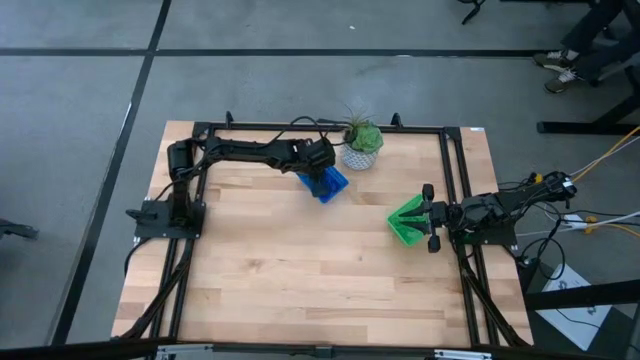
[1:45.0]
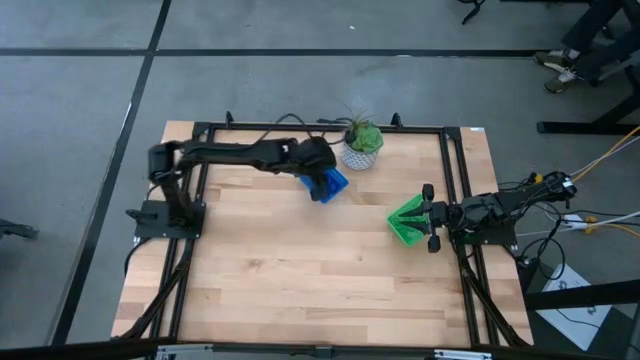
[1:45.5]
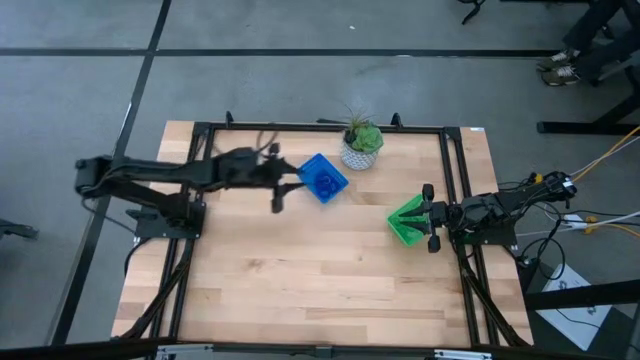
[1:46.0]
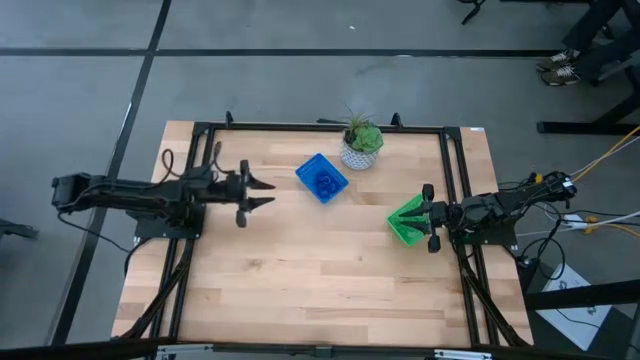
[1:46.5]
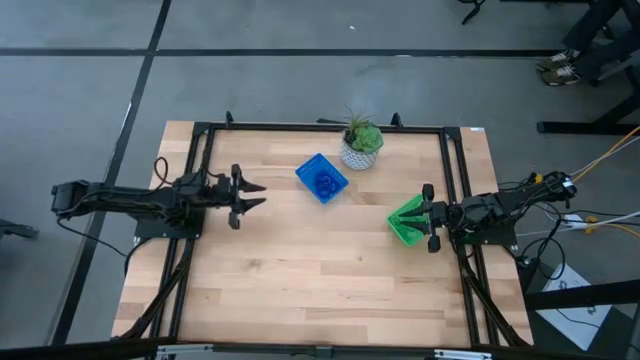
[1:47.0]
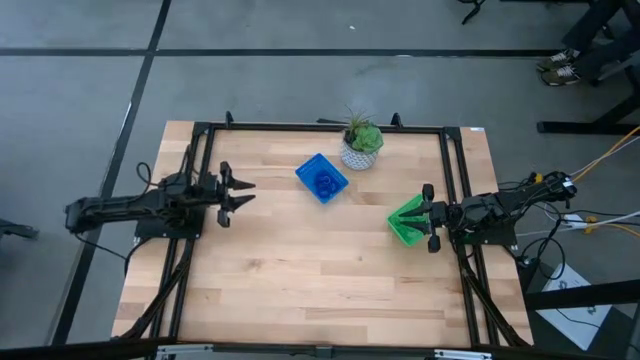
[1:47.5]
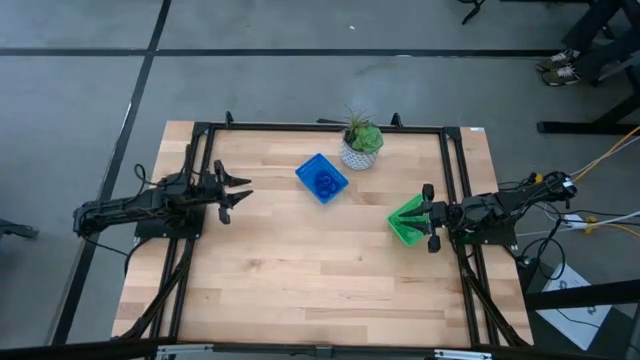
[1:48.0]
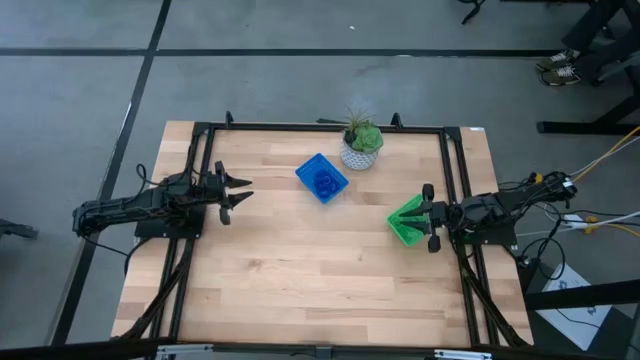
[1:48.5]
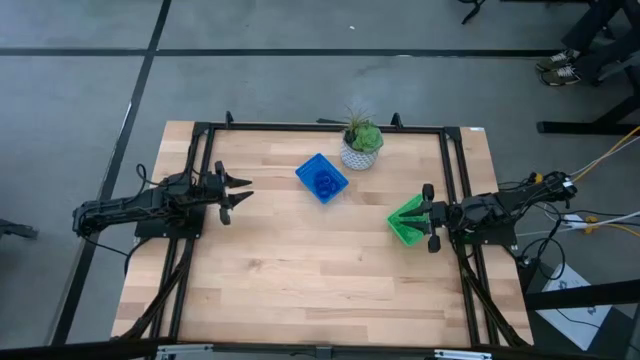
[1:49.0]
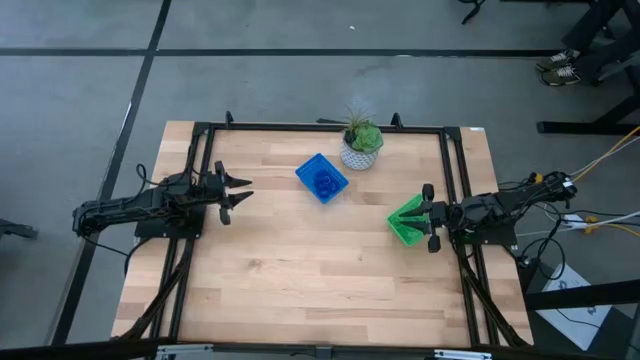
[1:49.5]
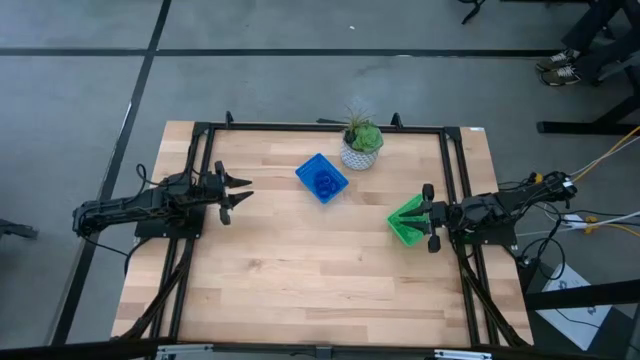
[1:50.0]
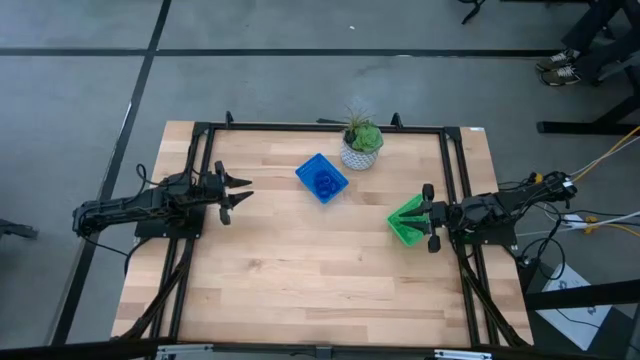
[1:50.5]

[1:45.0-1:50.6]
Task: Sort items
Return to Home Position

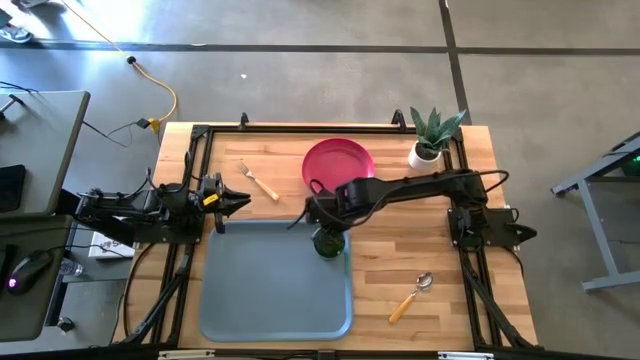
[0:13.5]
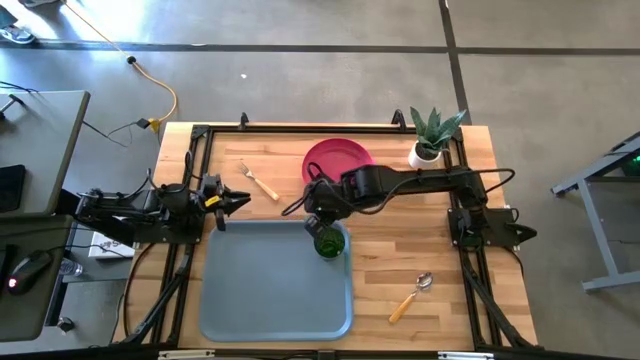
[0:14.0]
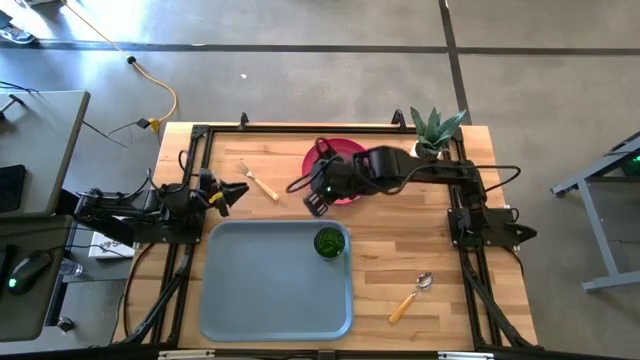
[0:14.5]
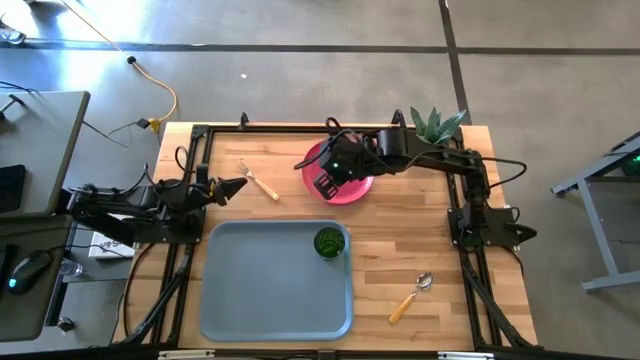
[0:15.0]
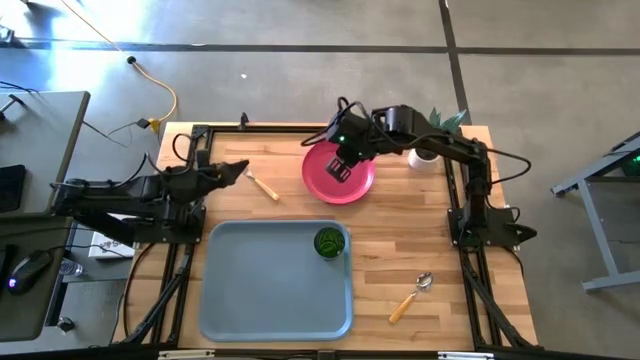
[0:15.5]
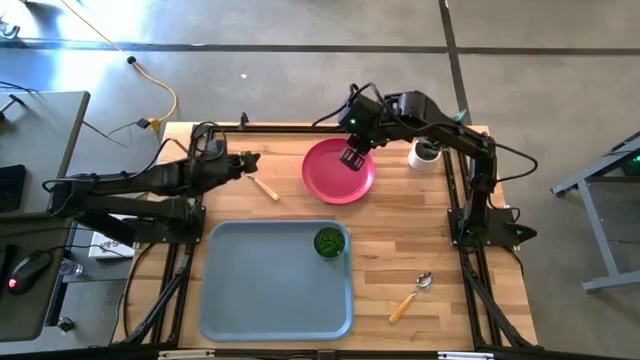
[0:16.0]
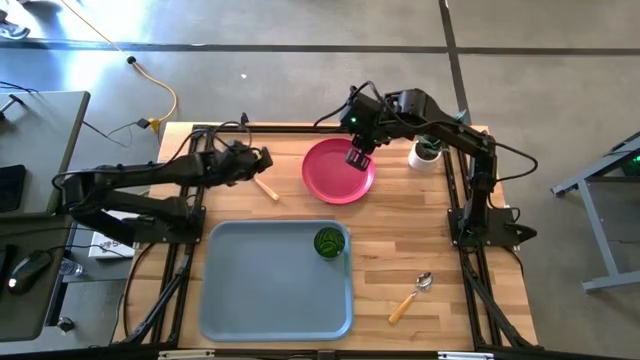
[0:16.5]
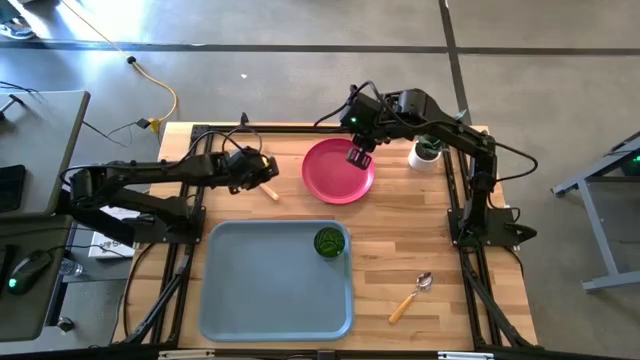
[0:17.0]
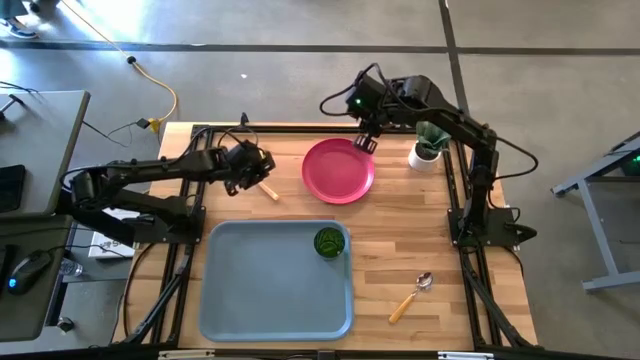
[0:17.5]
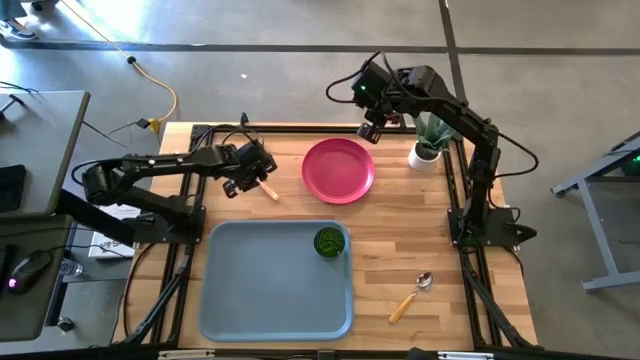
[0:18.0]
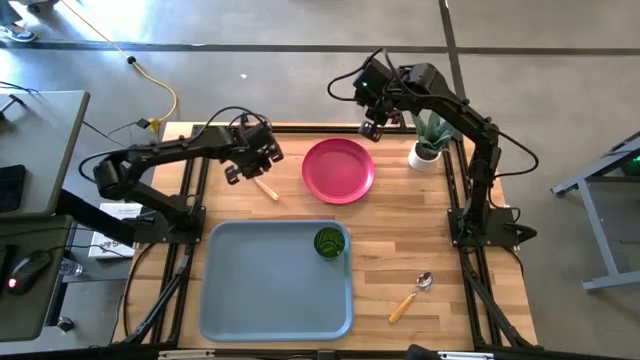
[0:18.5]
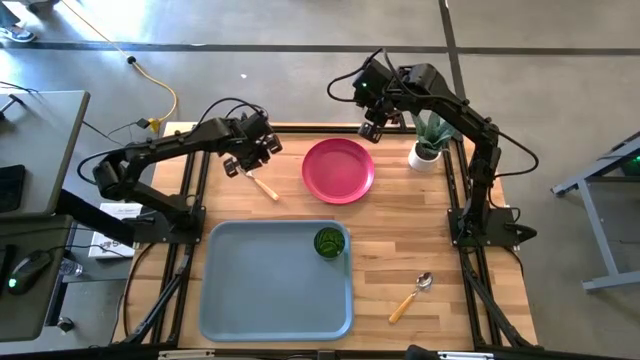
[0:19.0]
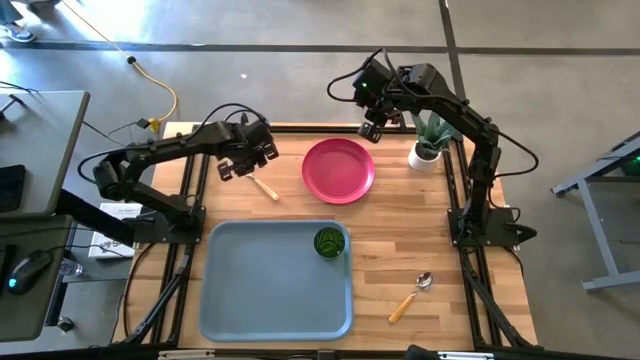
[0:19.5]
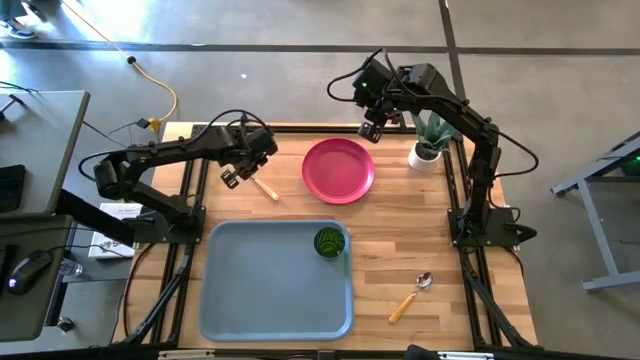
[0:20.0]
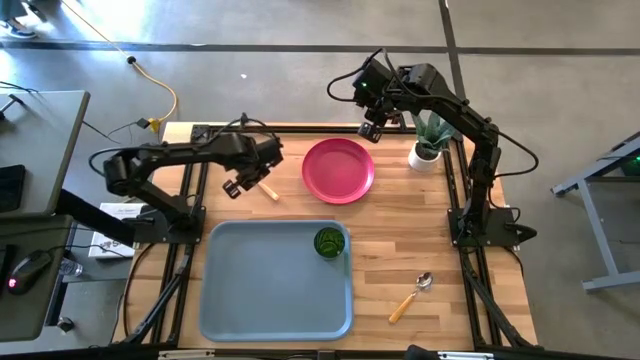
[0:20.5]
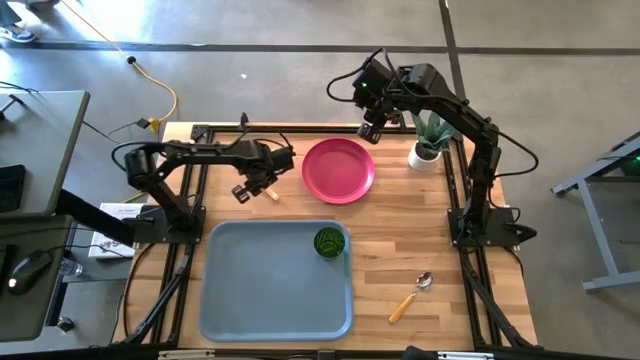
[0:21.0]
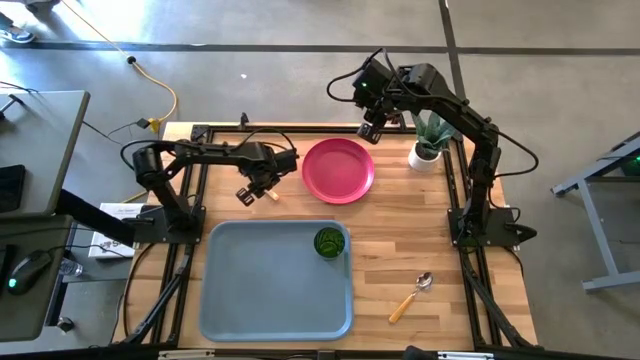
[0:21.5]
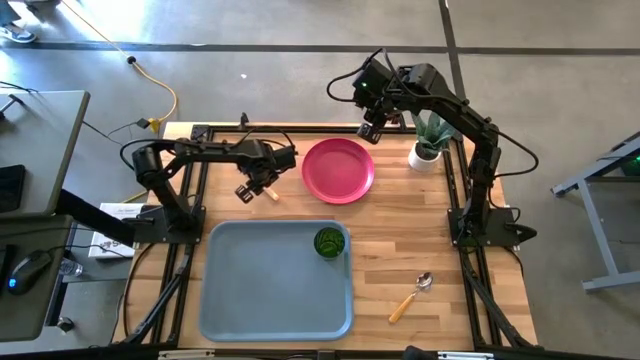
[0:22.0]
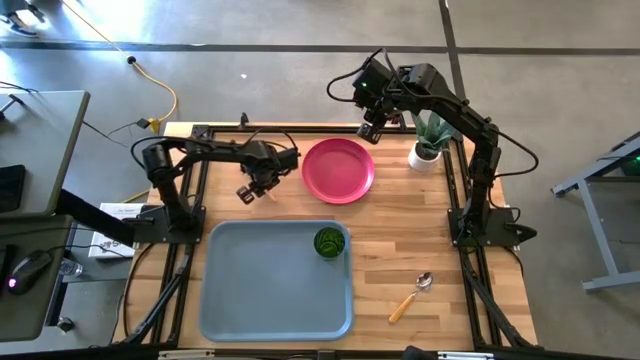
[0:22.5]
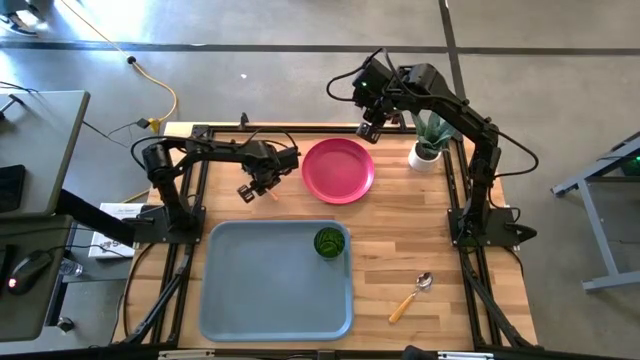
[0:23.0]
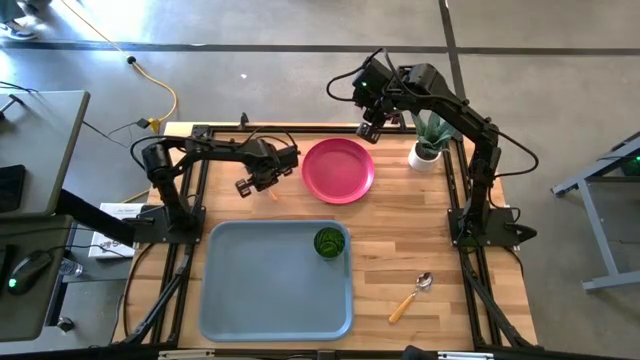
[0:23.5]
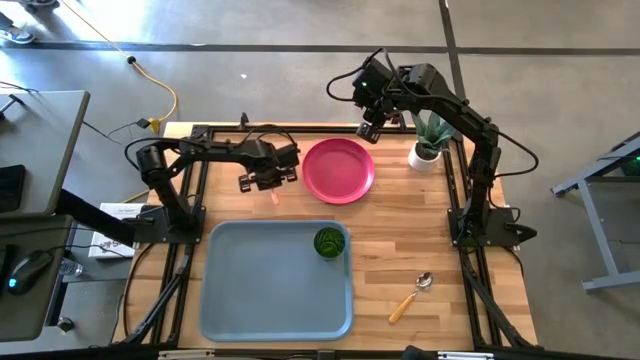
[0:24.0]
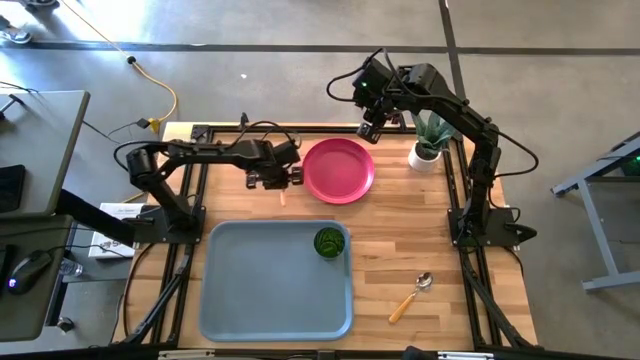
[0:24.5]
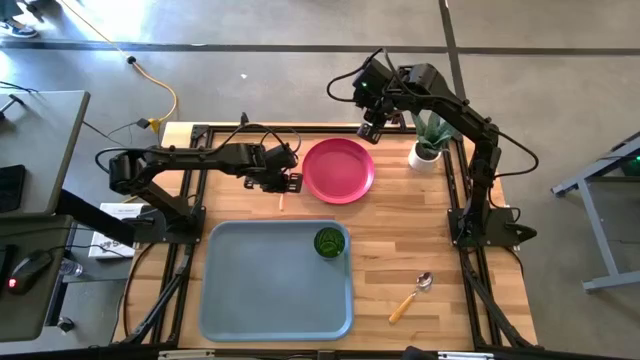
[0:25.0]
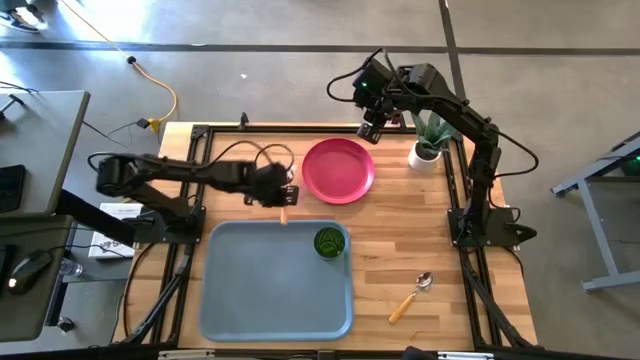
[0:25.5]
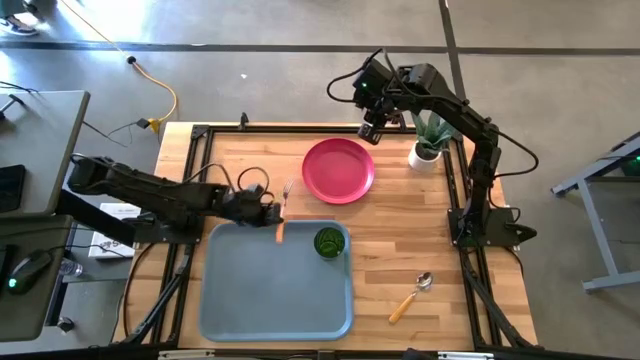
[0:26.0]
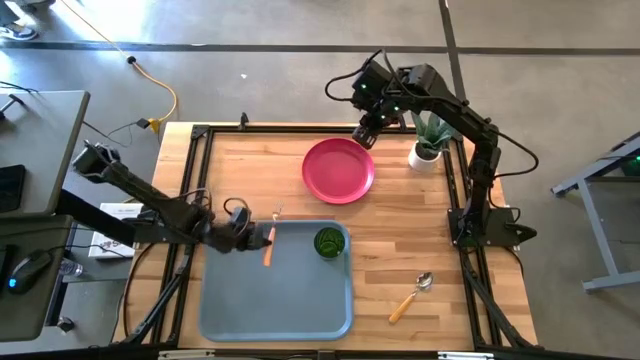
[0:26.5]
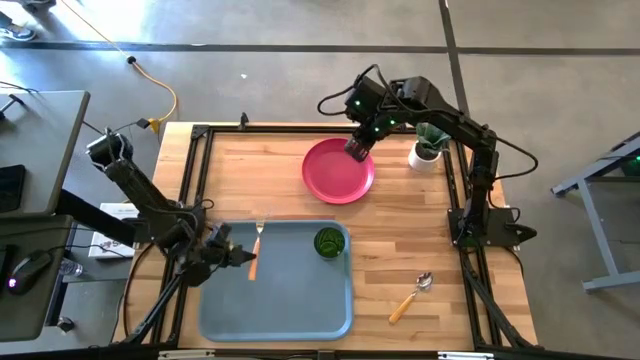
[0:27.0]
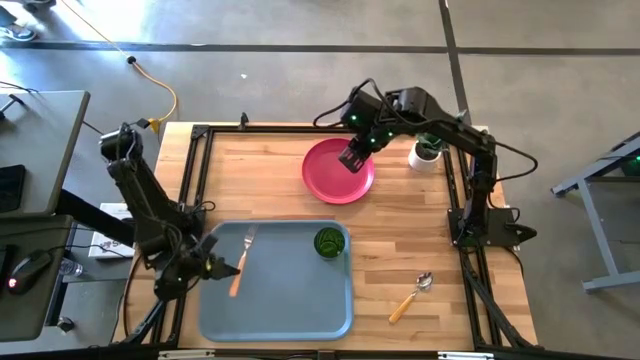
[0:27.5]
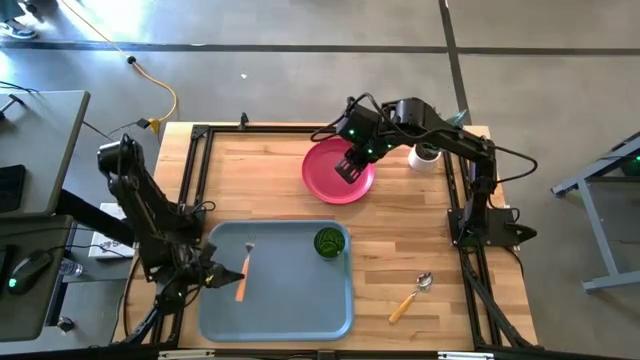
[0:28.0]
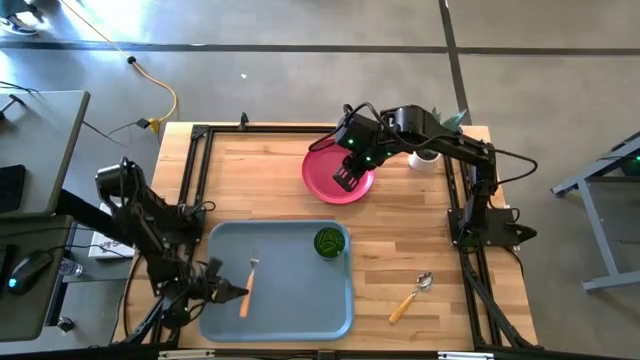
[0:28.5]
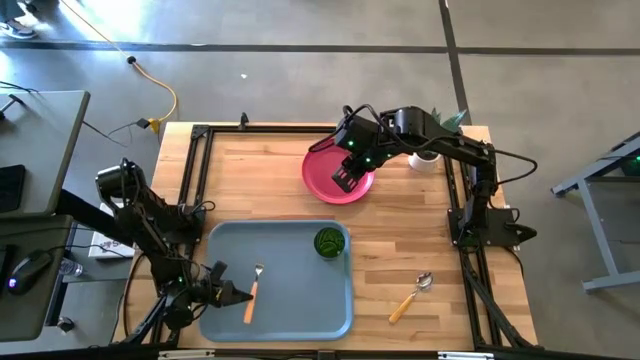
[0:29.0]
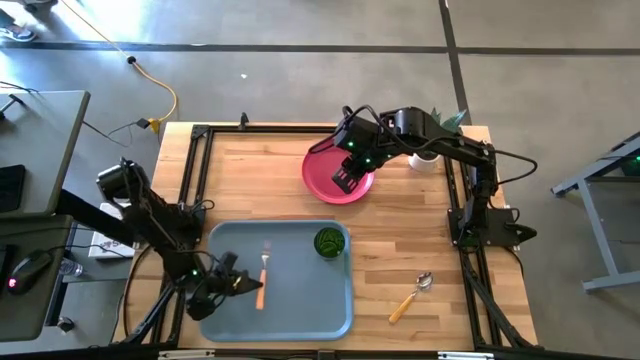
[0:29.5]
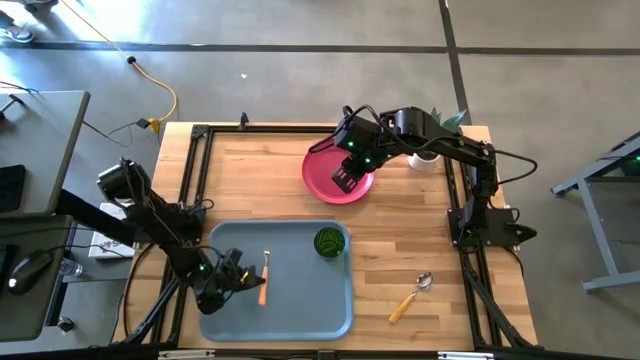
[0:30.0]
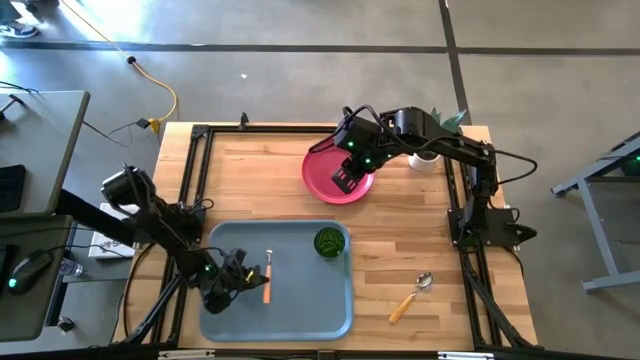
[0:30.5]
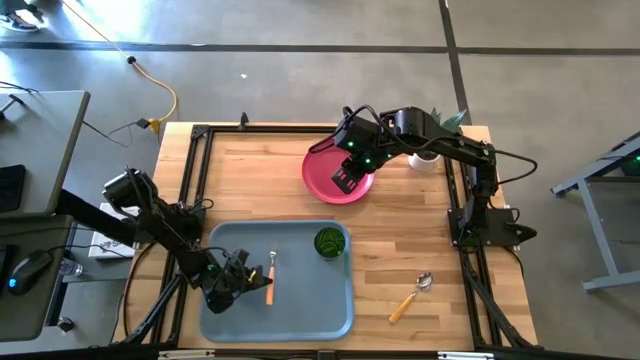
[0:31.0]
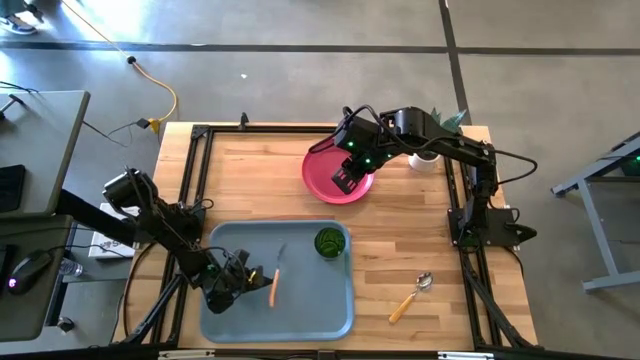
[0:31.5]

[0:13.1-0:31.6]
Task: Pick and place plate/cup/fork/spoon on tray
Put the orange fork on the blue serving tray to the bottom left of the green glass
